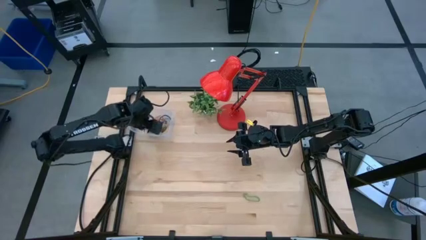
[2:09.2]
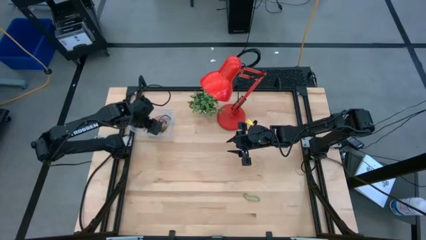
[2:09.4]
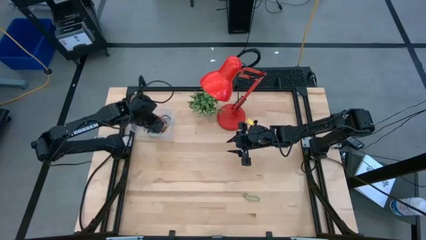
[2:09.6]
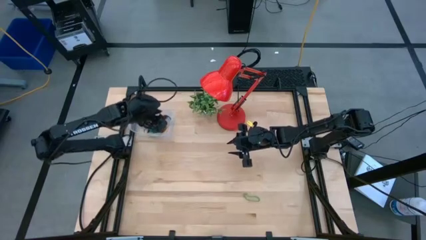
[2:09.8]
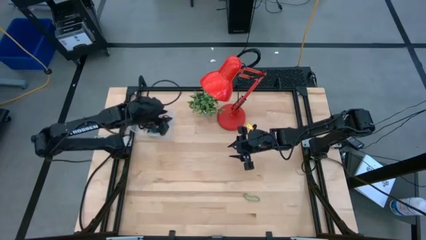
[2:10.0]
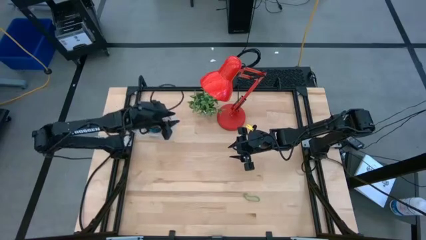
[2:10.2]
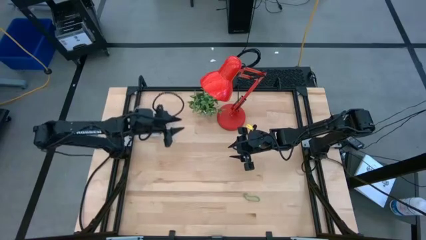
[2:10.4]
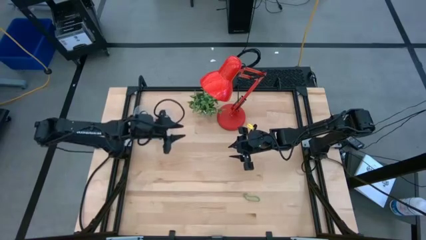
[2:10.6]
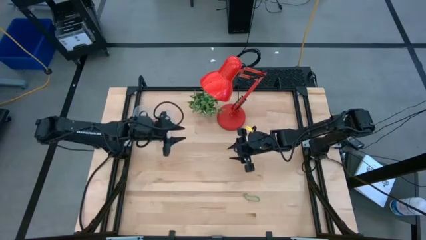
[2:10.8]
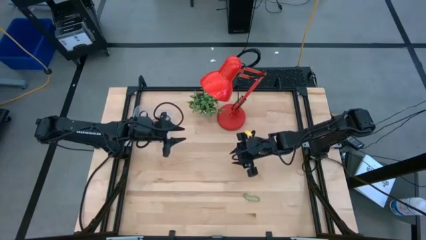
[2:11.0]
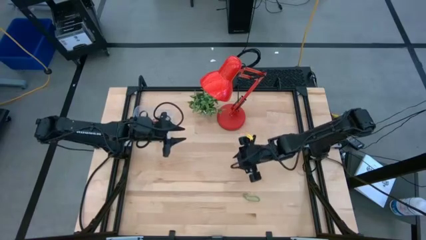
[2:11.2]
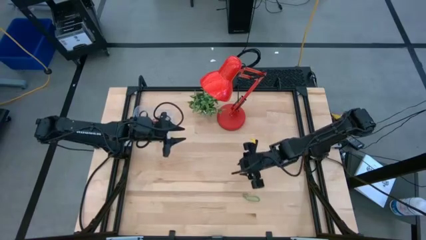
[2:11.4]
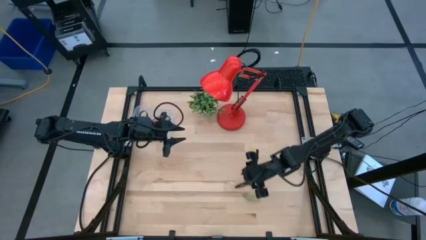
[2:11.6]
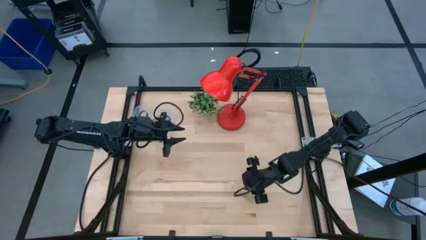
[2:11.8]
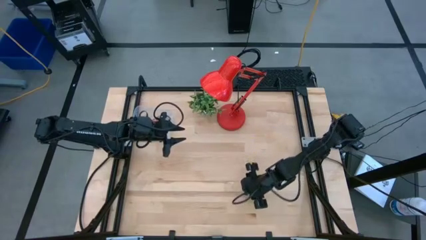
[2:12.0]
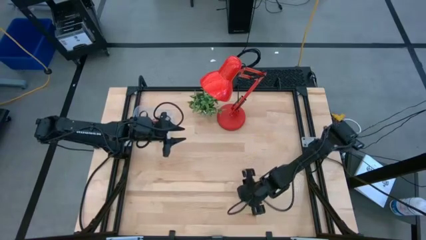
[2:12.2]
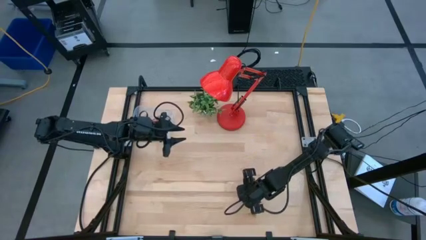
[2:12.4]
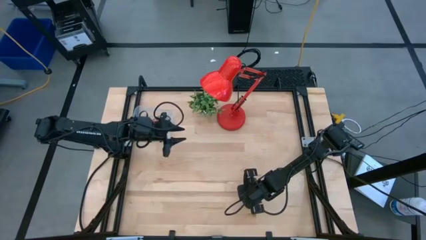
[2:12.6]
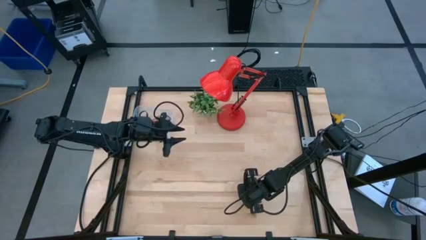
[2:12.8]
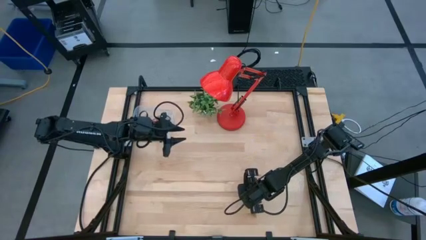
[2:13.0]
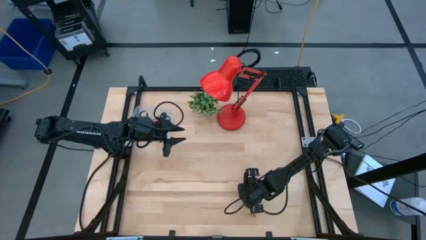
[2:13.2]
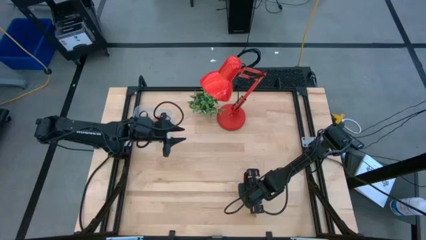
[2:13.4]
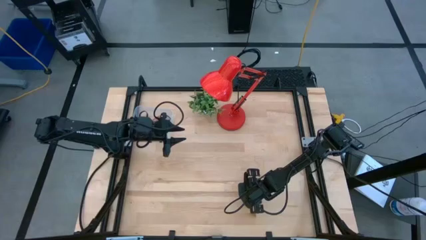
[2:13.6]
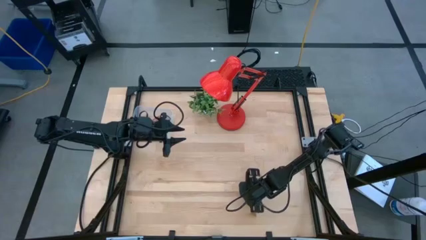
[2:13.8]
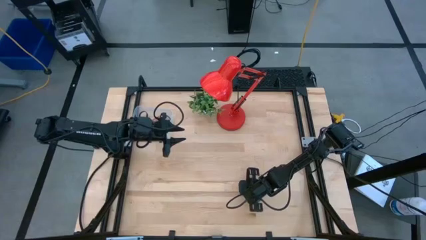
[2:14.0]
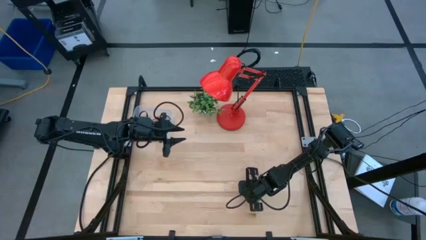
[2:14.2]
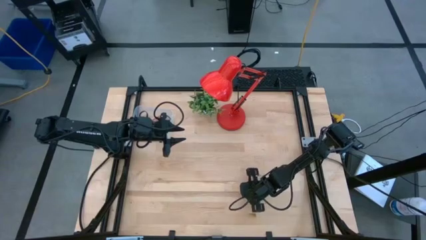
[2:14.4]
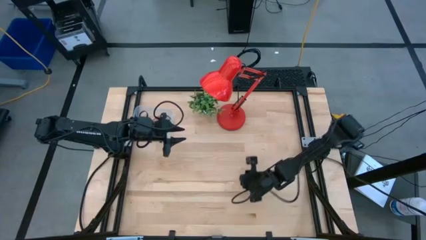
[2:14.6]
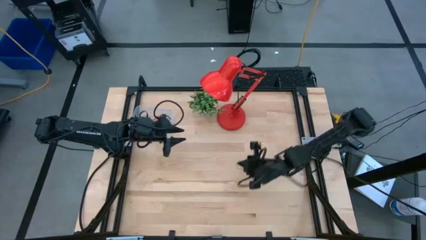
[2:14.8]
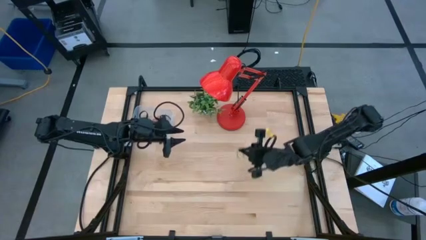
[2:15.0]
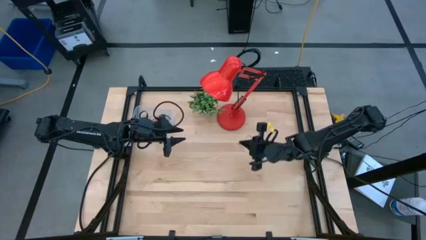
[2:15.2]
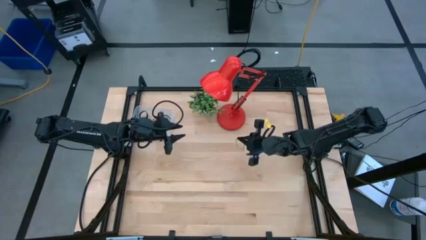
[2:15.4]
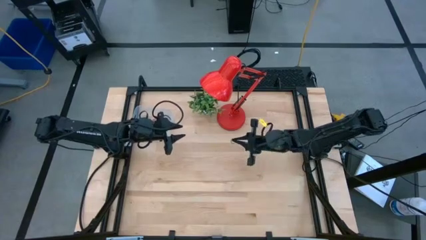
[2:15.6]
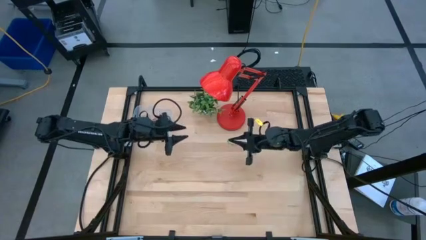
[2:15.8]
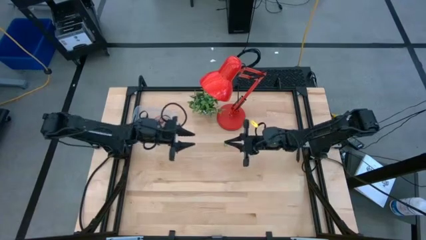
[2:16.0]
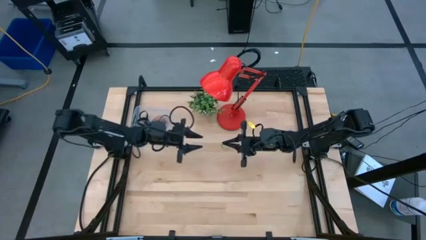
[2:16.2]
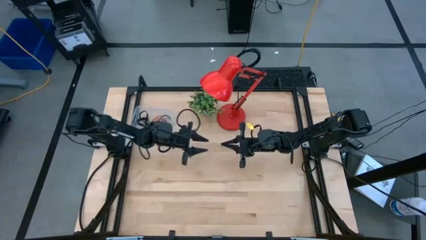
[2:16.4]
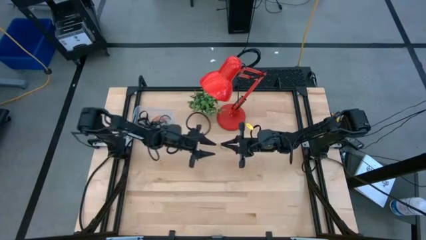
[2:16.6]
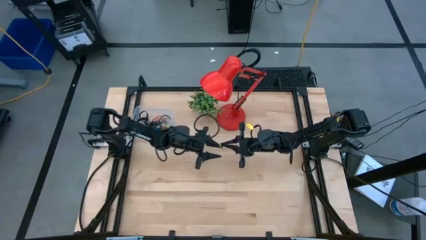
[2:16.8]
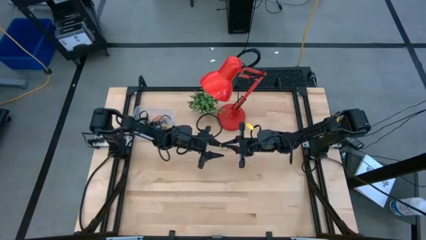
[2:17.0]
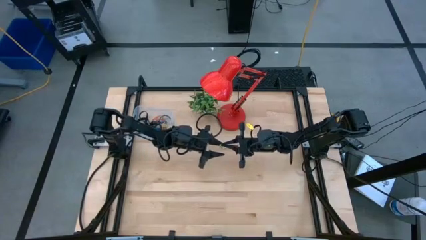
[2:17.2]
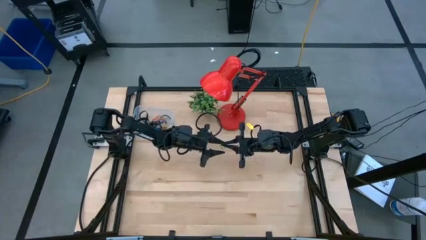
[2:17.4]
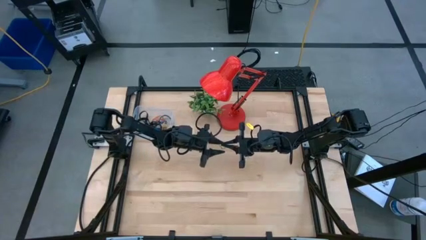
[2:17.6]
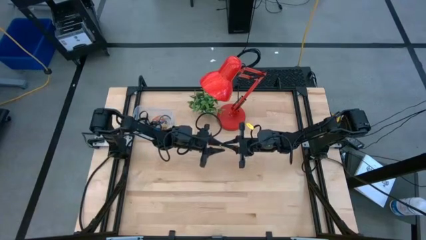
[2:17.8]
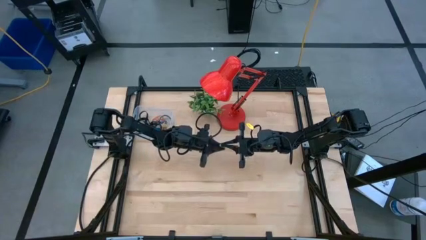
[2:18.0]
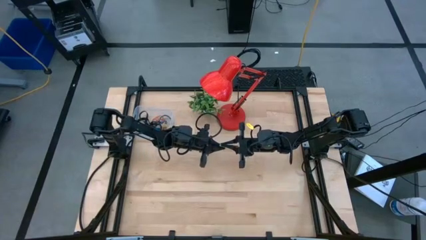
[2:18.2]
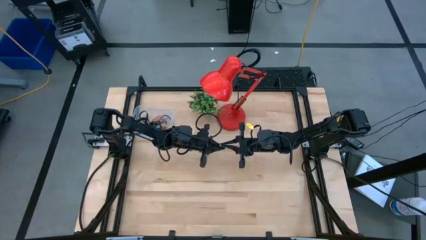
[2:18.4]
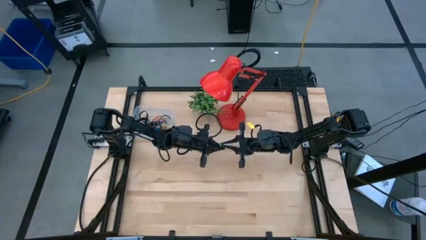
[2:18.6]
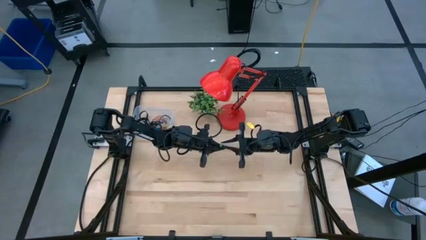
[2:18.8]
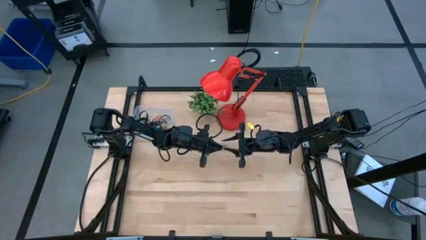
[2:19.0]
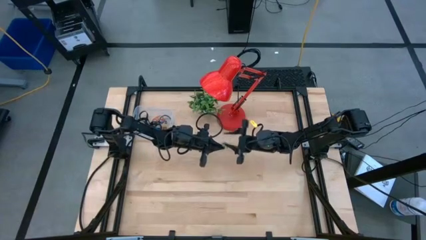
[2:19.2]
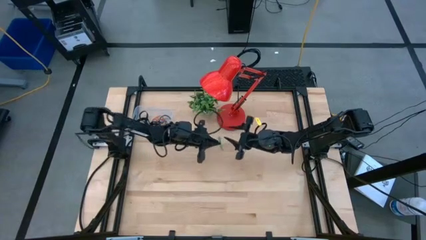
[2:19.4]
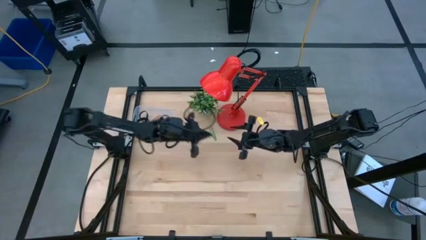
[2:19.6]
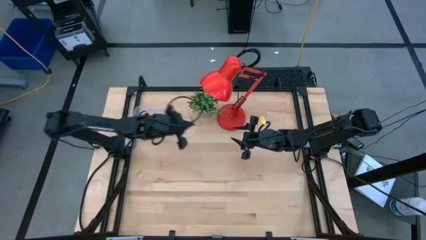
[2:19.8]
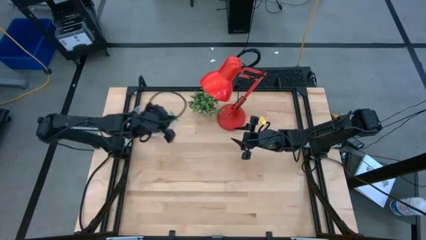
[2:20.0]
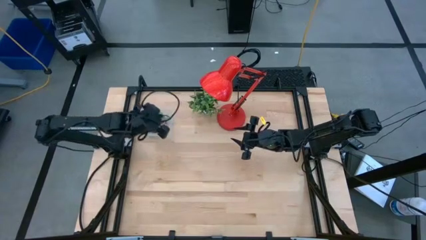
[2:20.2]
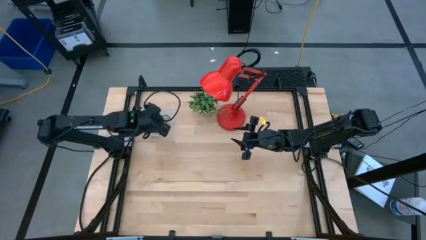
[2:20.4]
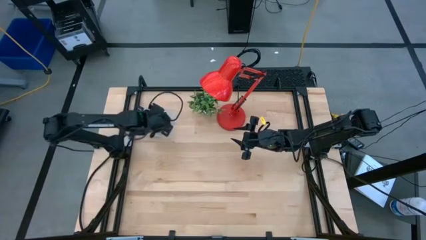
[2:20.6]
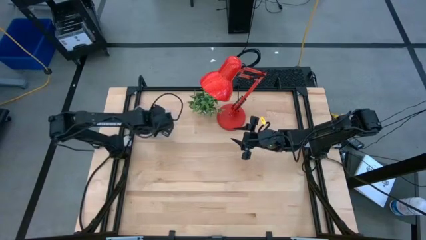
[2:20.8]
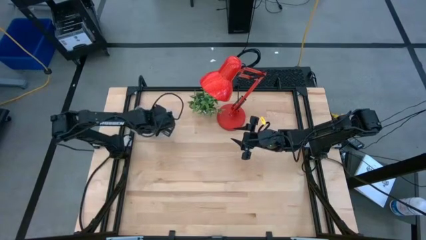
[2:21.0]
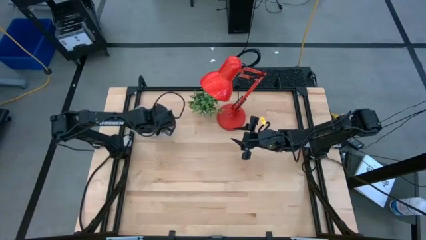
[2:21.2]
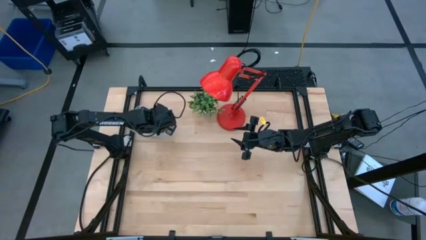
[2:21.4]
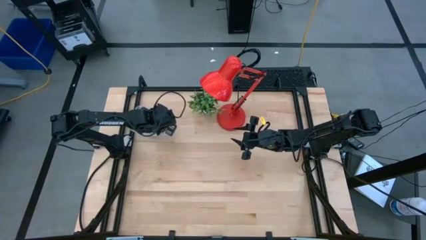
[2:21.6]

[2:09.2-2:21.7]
Task: Pick and place rubber bands into bin
Put the green rubber band into the transparent bin
